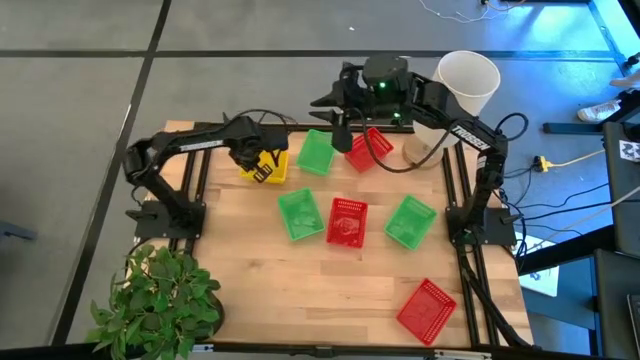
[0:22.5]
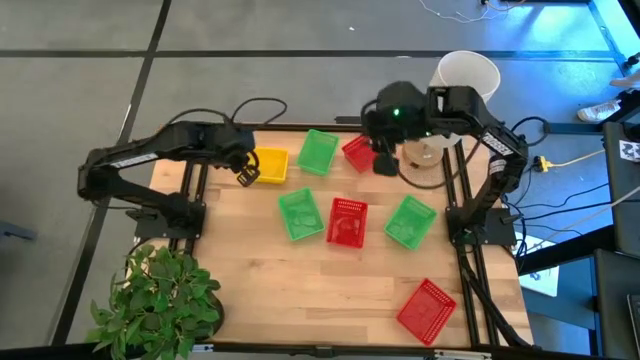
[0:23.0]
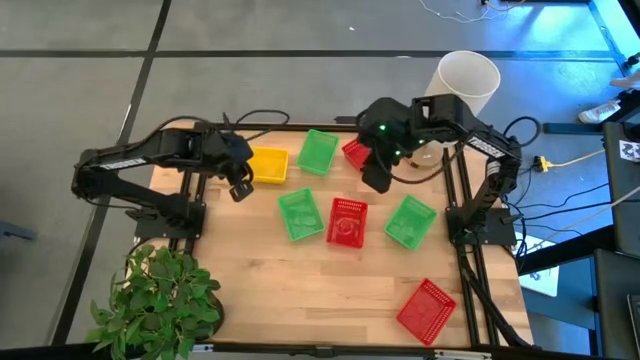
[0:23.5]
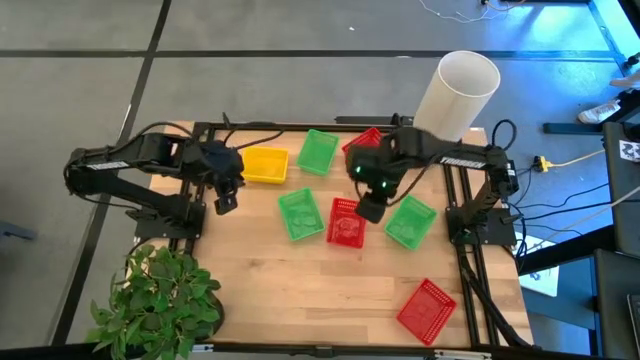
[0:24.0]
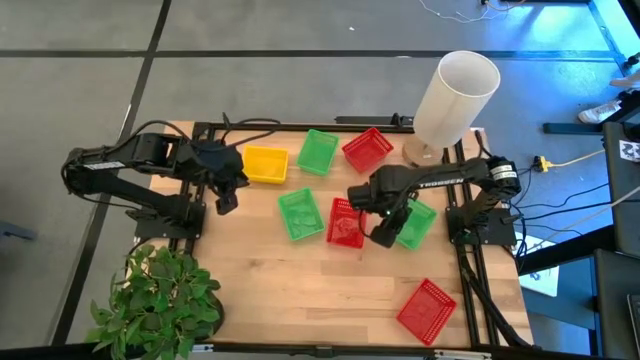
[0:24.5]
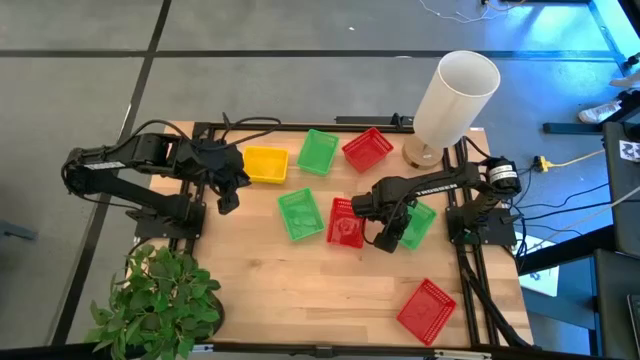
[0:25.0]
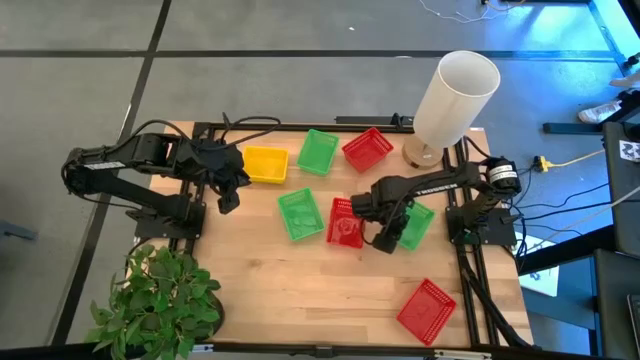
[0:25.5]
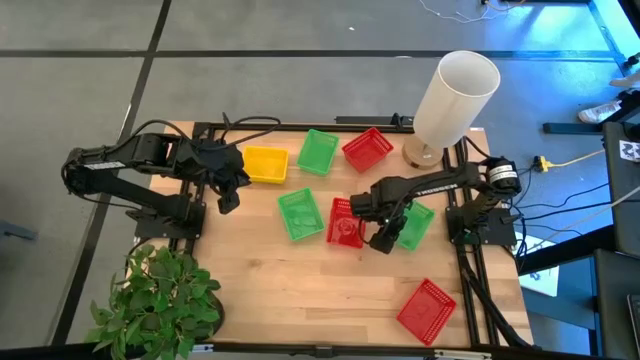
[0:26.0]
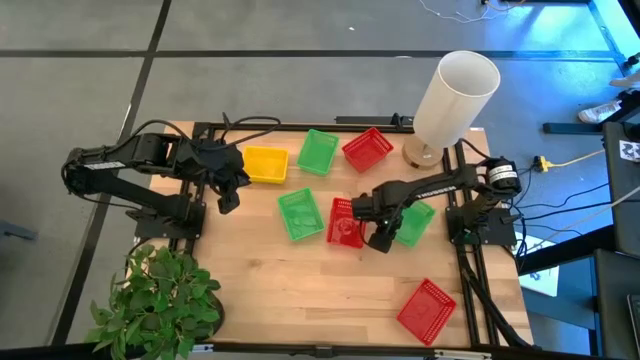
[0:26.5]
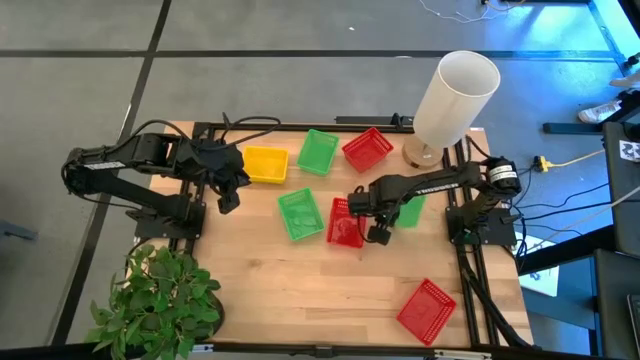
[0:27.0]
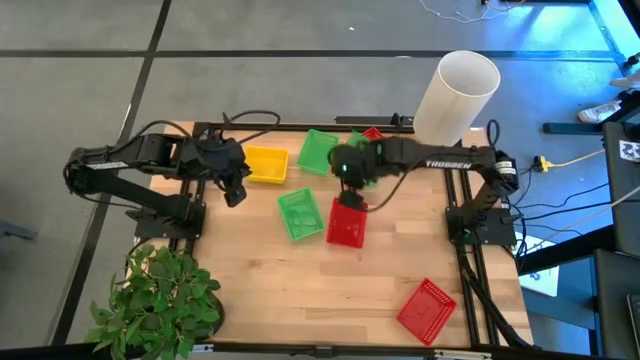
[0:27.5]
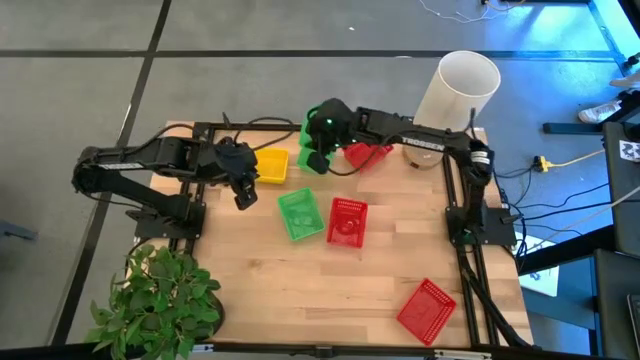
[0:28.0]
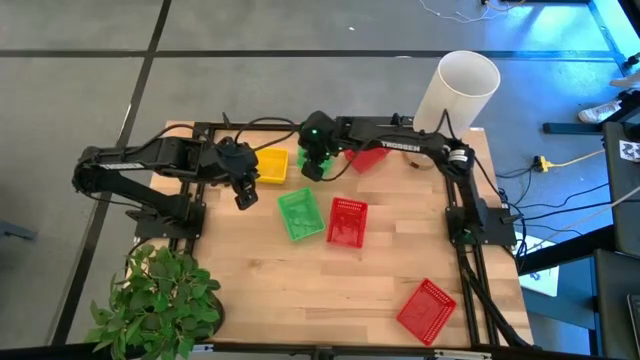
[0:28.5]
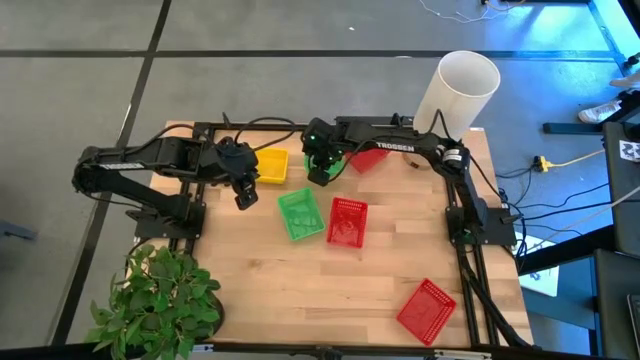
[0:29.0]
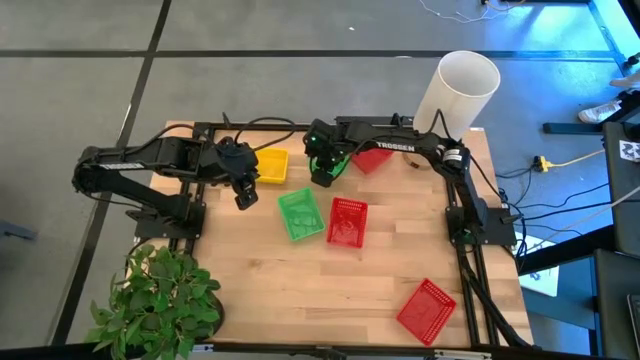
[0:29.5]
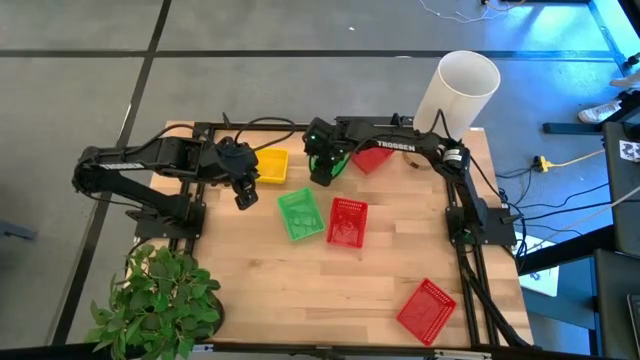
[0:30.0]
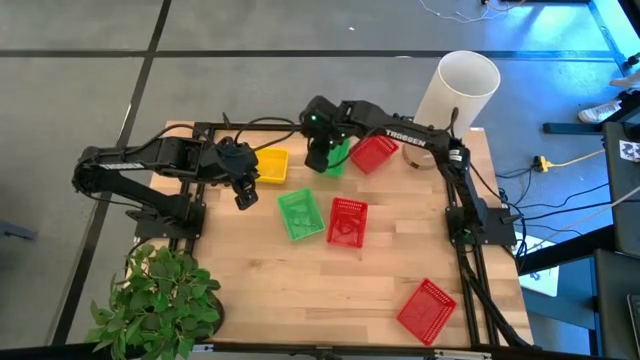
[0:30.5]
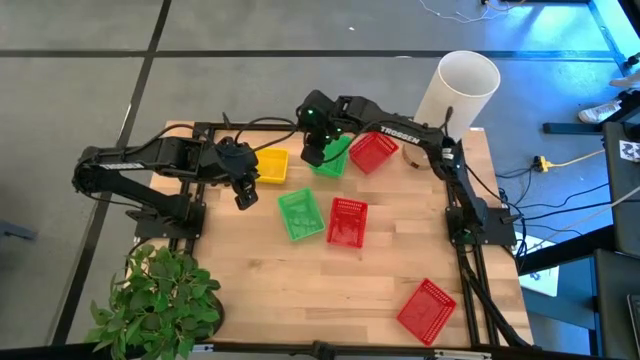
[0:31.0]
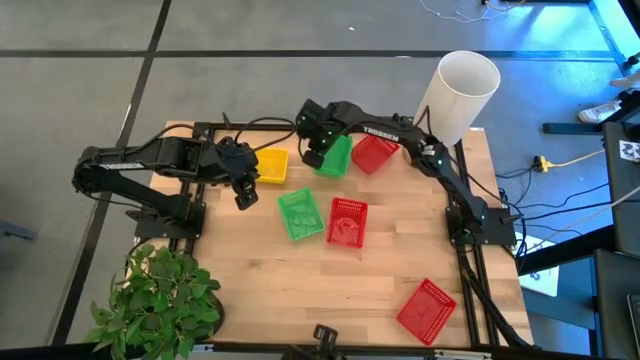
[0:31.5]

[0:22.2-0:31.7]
Stack the right green bin on top of the top green bin

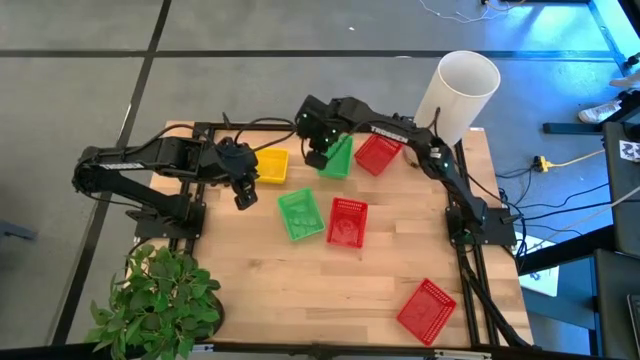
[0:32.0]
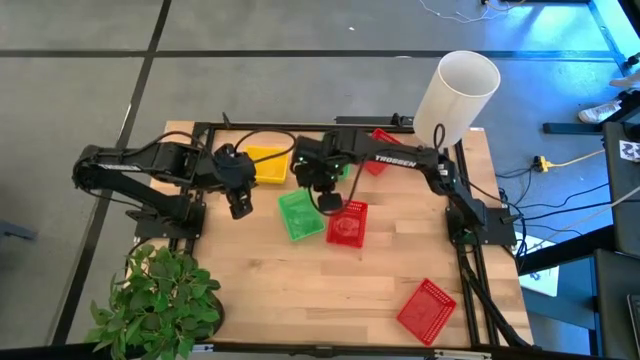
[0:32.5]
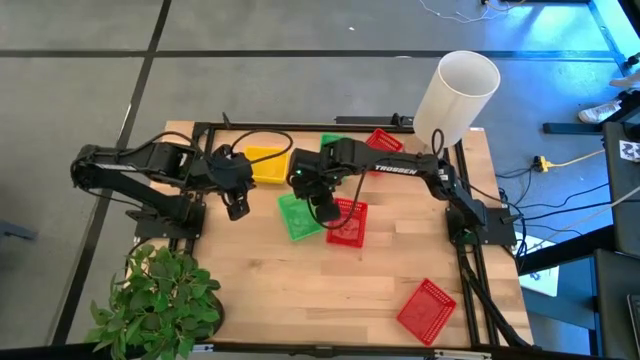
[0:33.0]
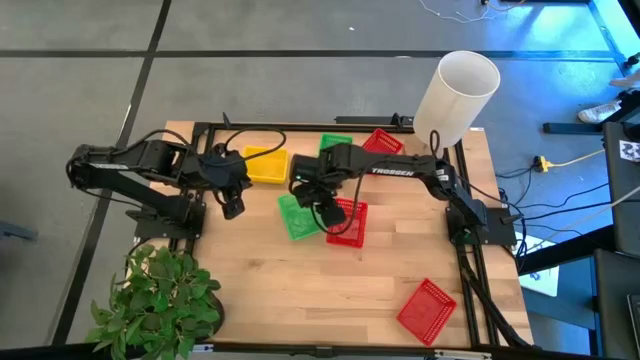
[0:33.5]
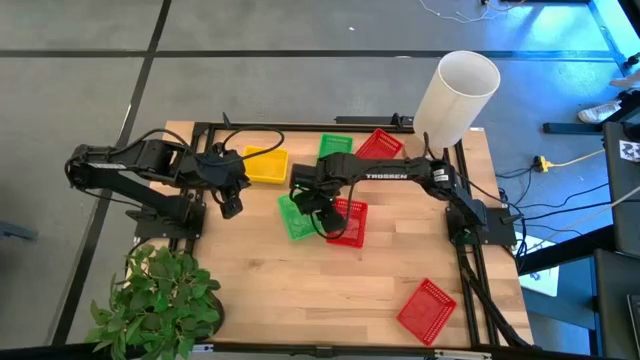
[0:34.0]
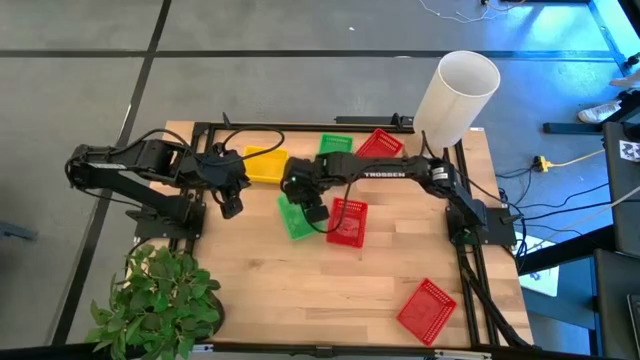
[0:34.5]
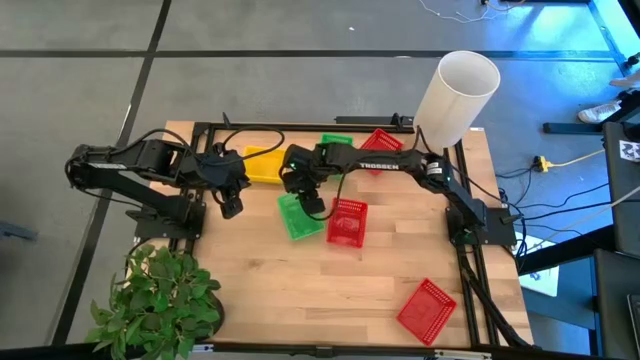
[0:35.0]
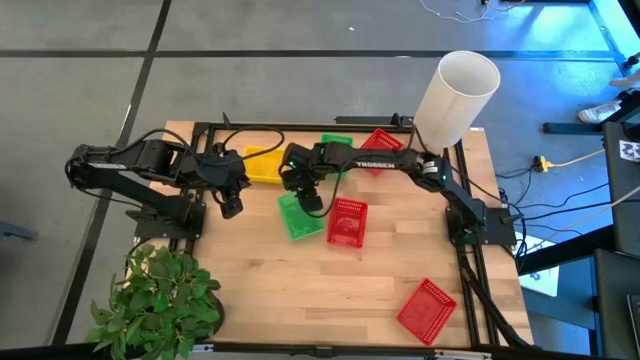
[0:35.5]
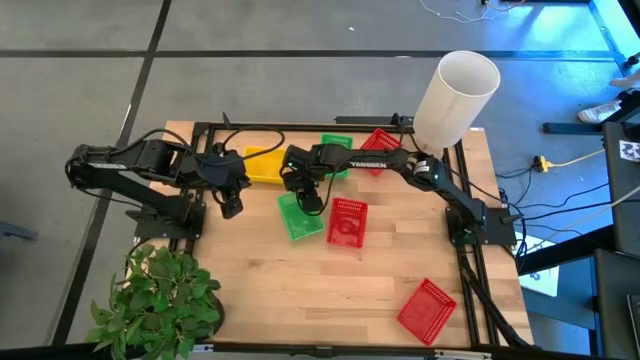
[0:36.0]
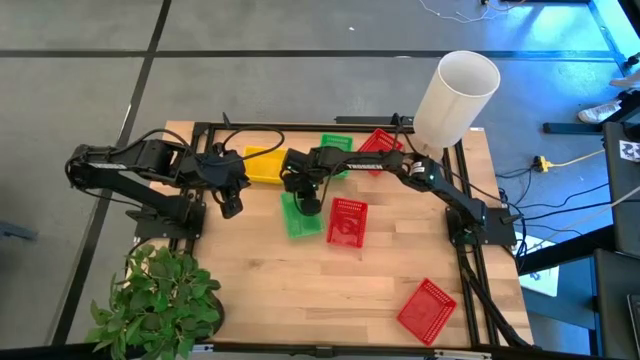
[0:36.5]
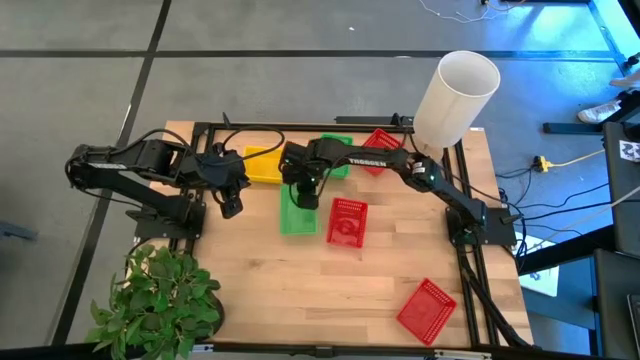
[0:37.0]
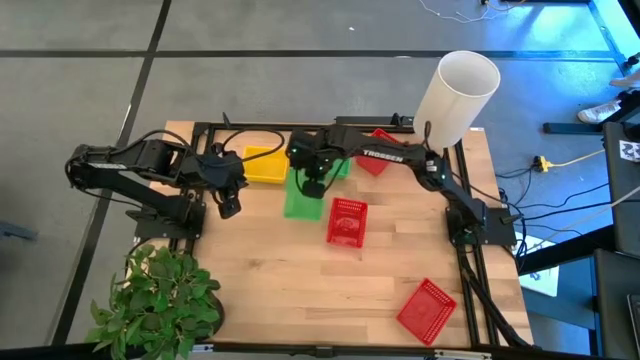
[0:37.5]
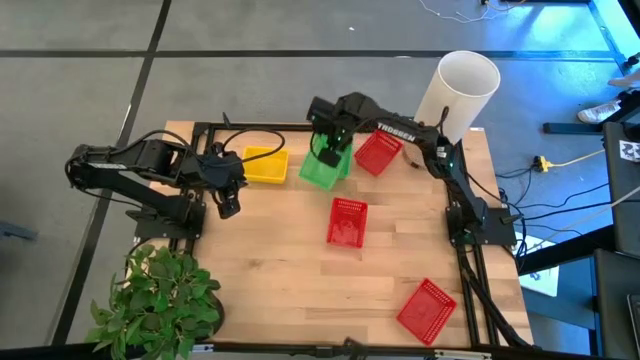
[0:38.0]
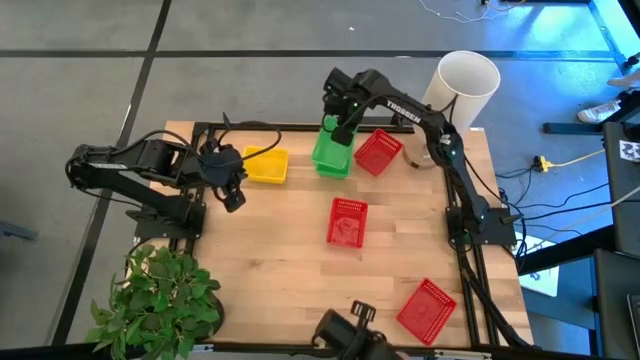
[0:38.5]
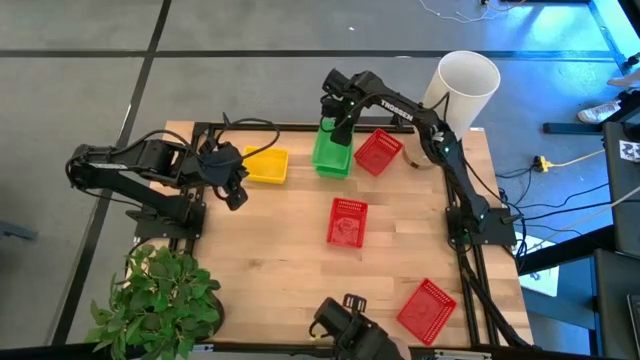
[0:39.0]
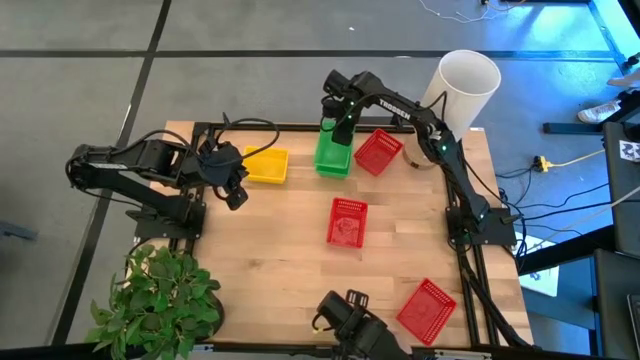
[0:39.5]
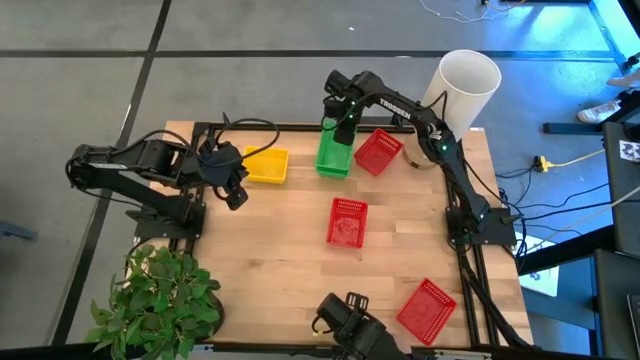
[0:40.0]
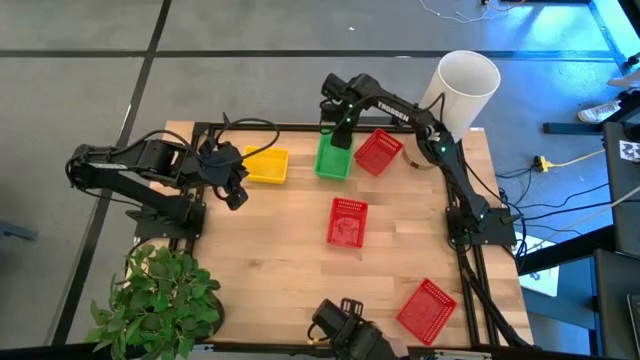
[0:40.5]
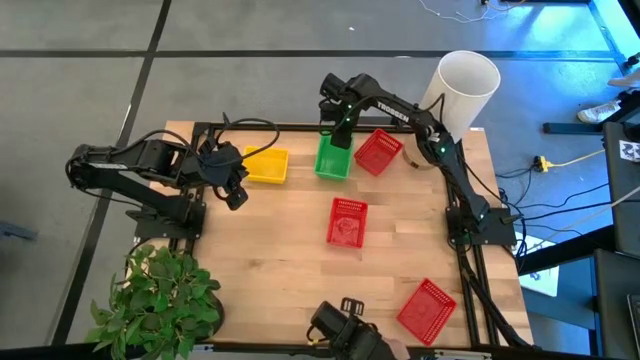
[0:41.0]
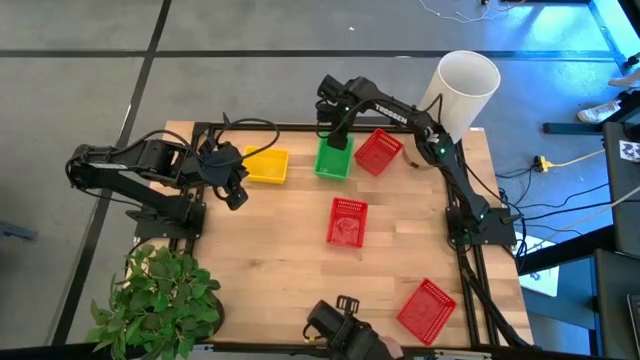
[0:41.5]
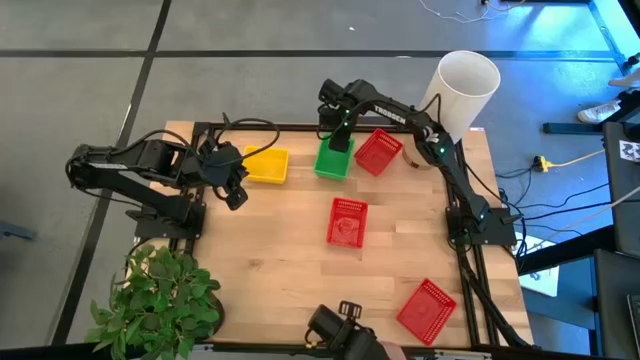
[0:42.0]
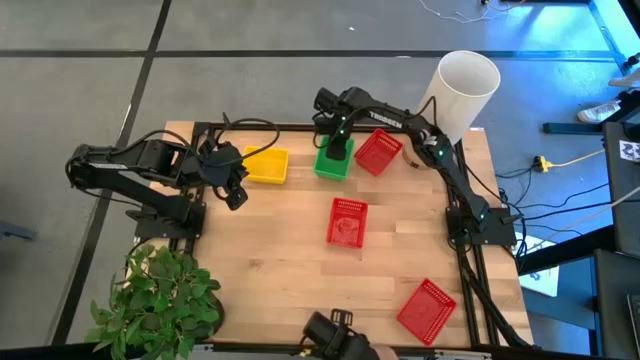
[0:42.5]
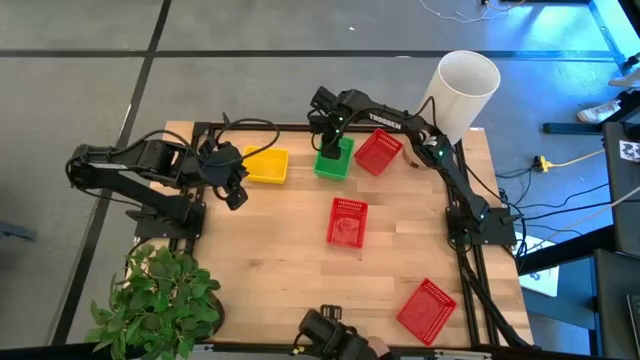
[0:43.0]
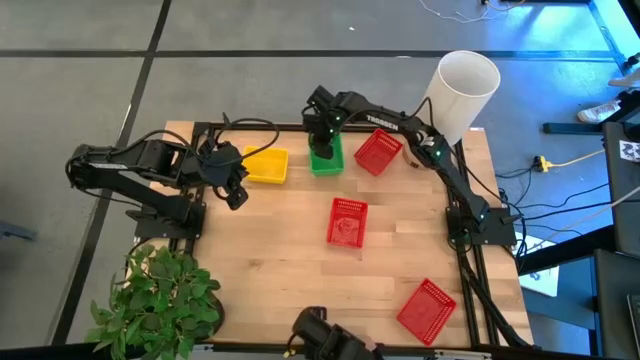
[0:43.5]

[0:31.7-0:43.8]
Stack the bottom green bin on top of the top green bins
